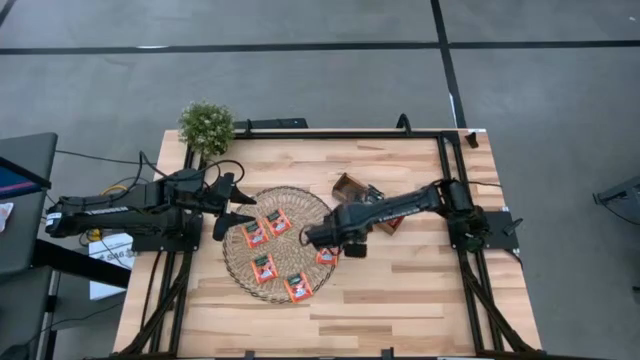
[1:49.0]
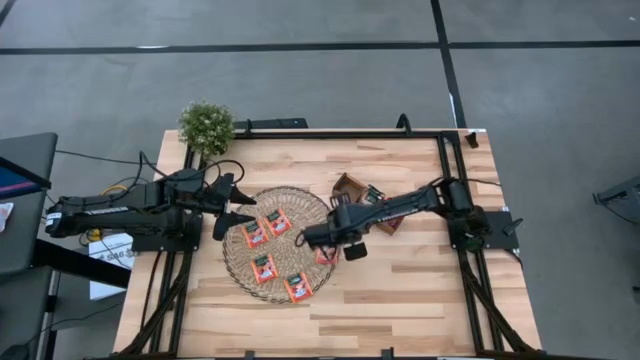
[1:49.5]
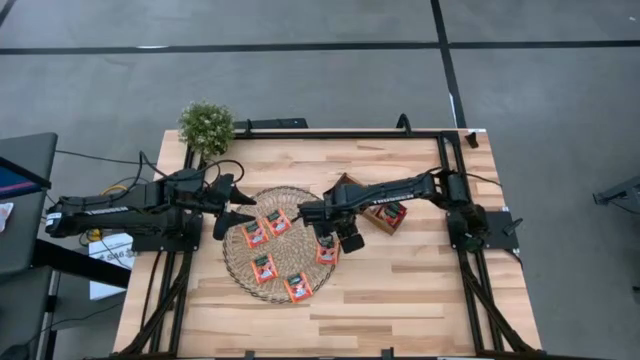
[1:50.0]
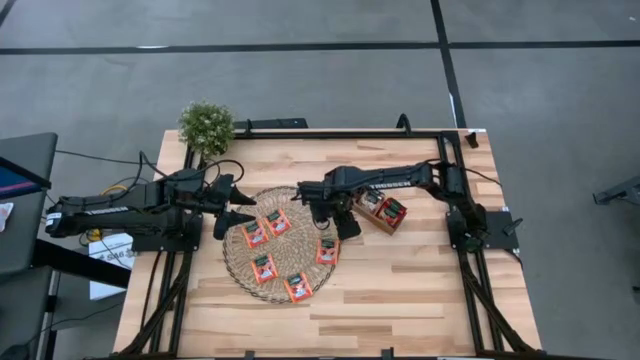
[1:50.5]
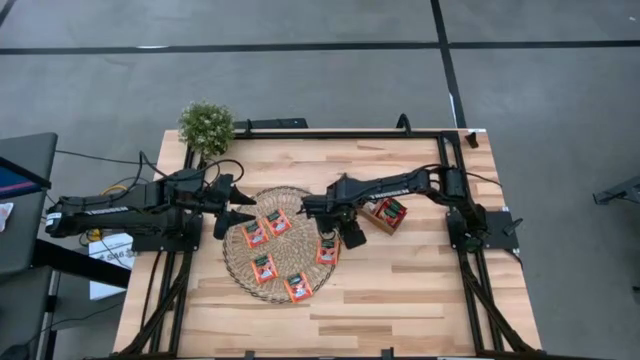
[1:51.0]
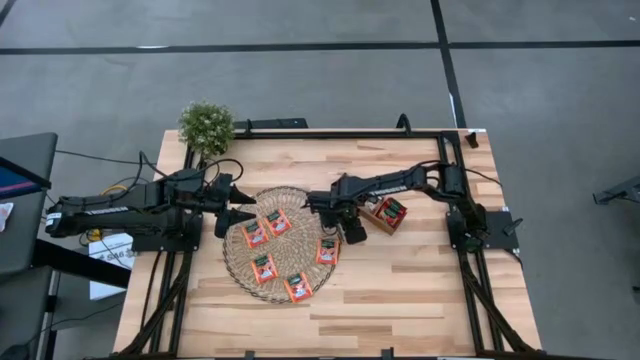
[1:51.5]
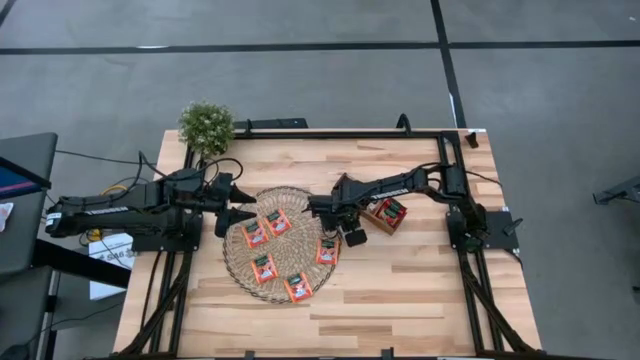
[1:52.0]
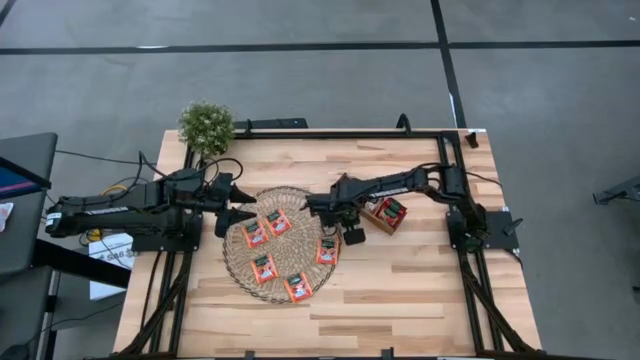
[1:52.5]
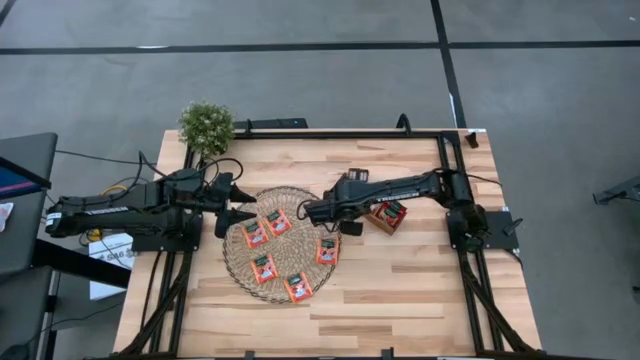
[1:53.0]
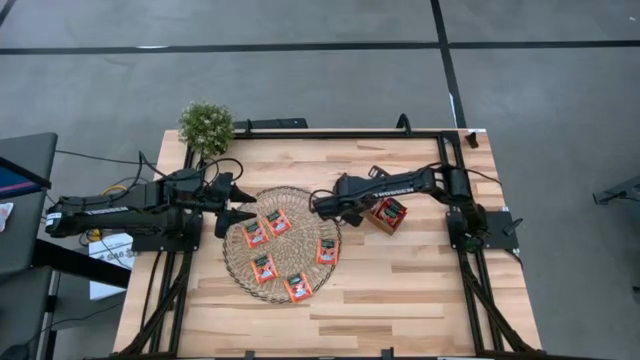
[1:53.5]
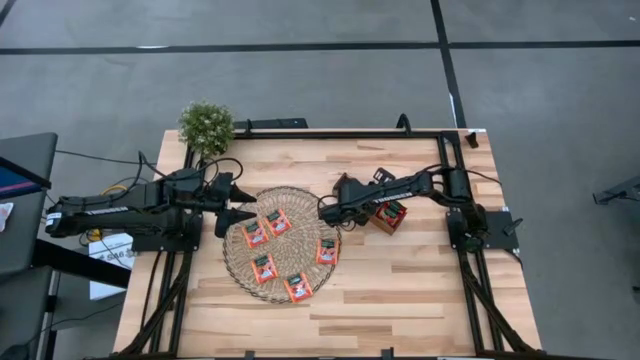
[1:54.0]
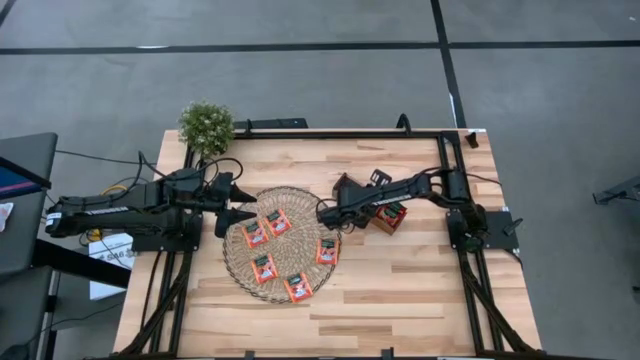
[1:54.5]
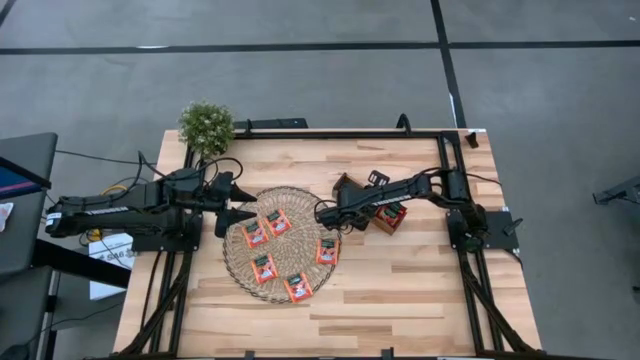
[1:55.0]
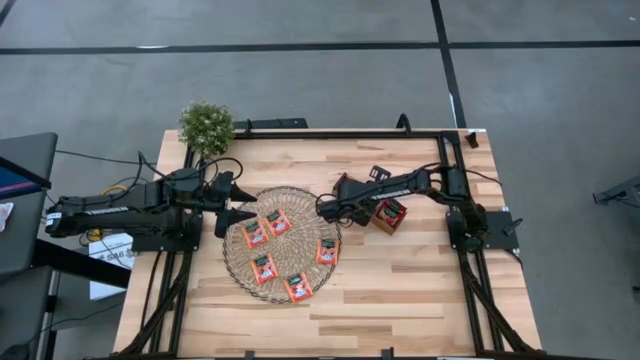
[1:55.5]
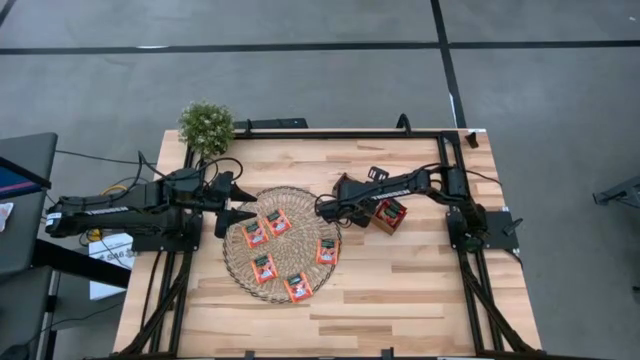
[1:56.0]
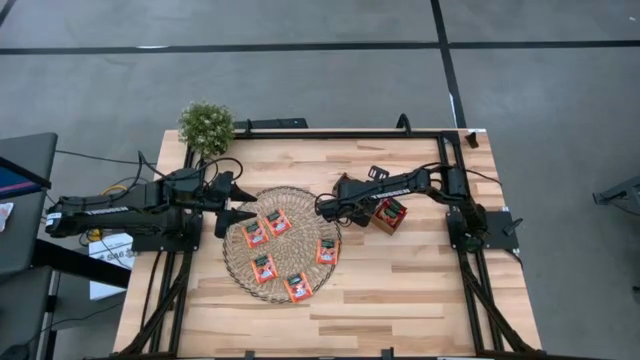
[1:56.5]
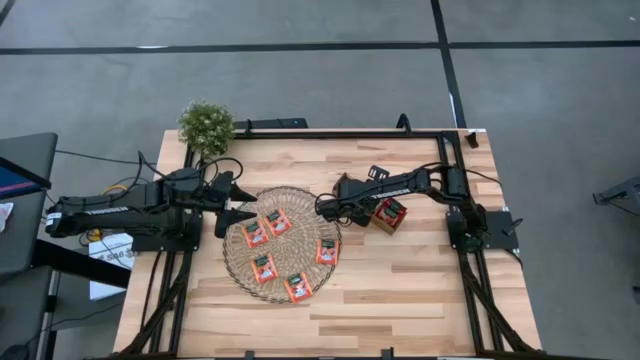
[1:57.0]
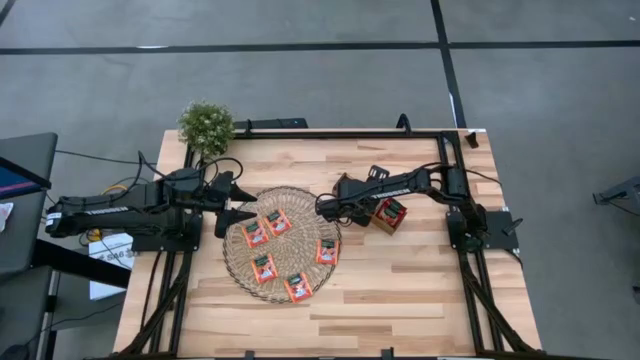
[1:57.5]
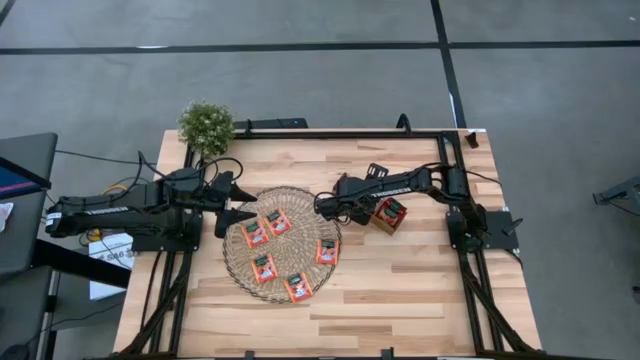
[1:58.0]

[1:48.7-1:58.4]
Task: Pick & Place Tea
Put the brown tea bag into the middle section of the wooden organizer

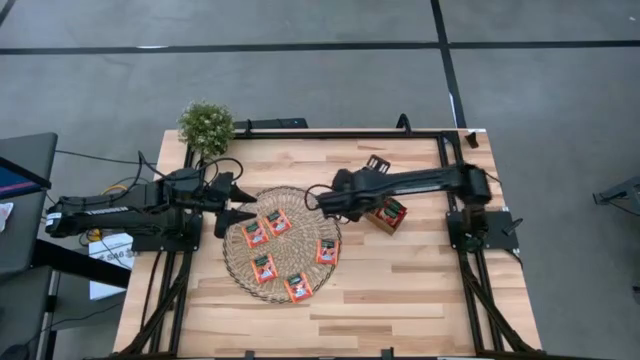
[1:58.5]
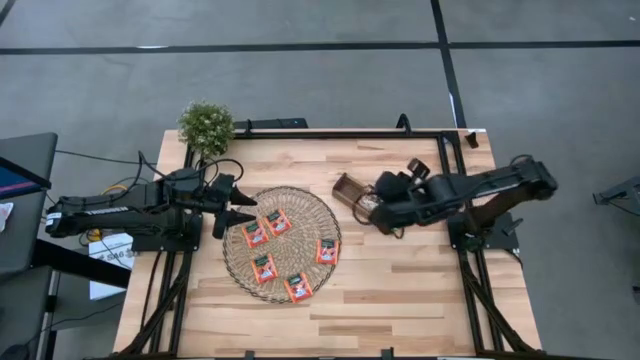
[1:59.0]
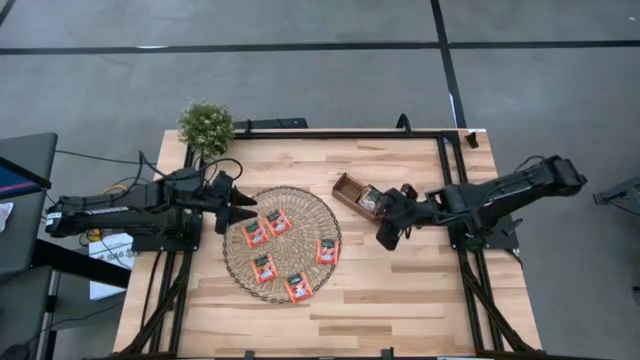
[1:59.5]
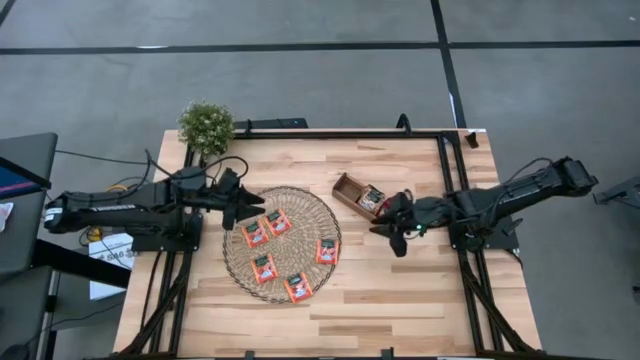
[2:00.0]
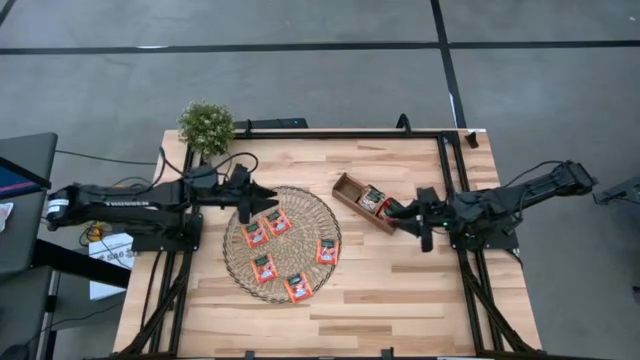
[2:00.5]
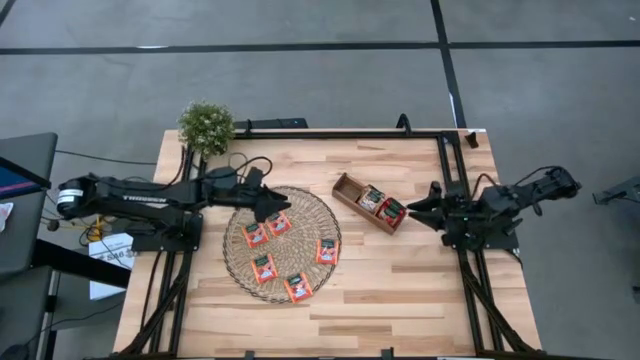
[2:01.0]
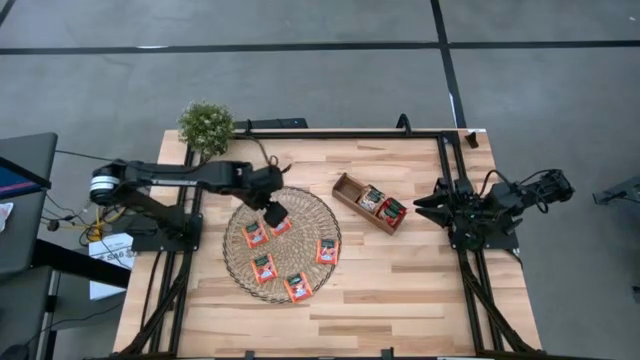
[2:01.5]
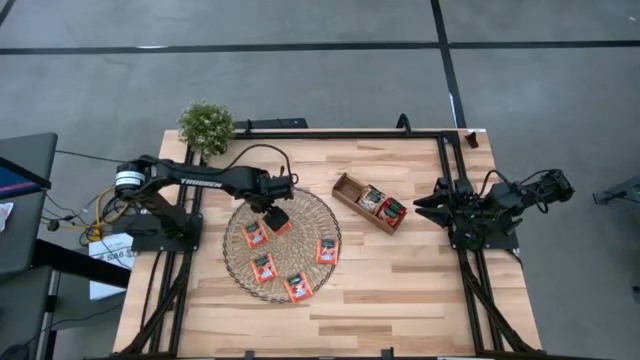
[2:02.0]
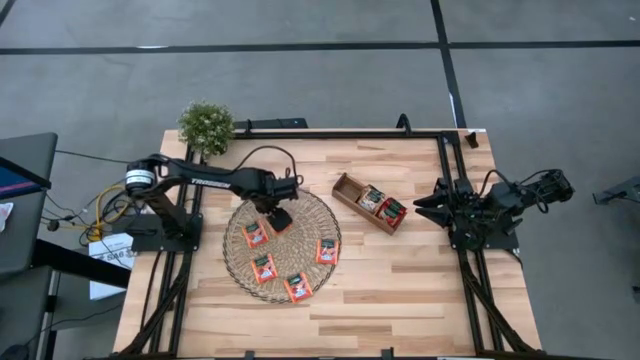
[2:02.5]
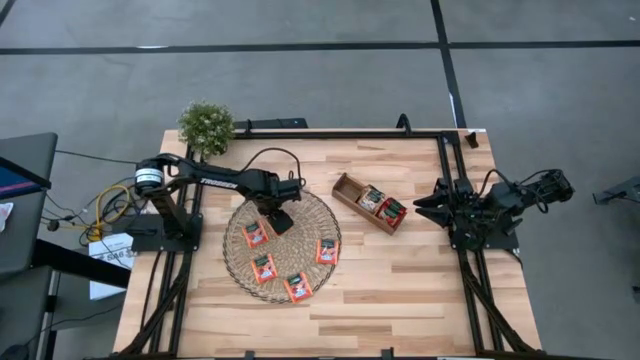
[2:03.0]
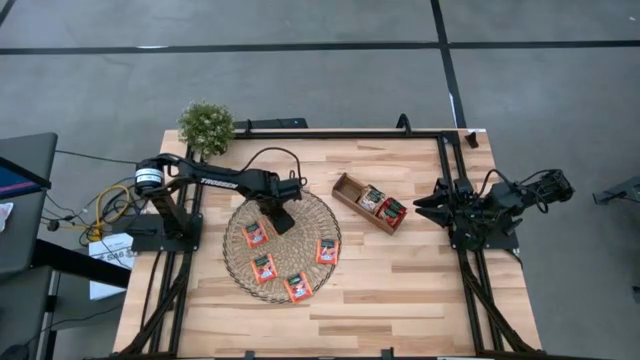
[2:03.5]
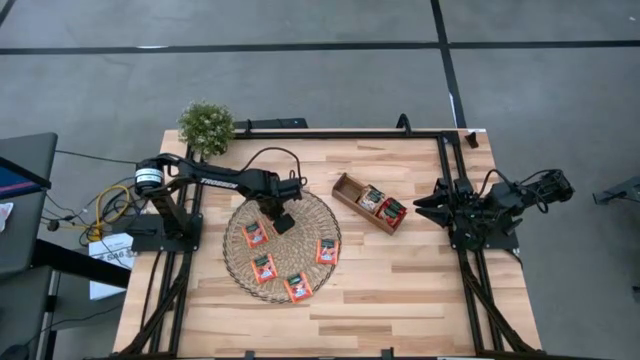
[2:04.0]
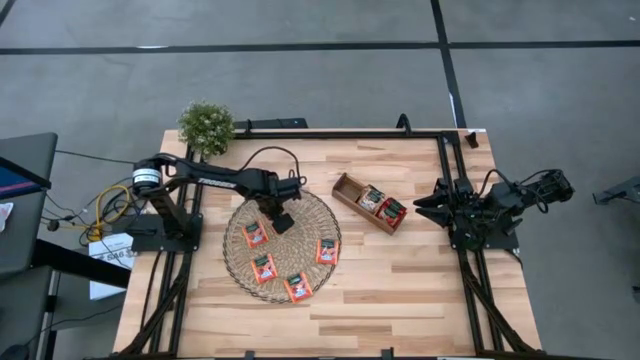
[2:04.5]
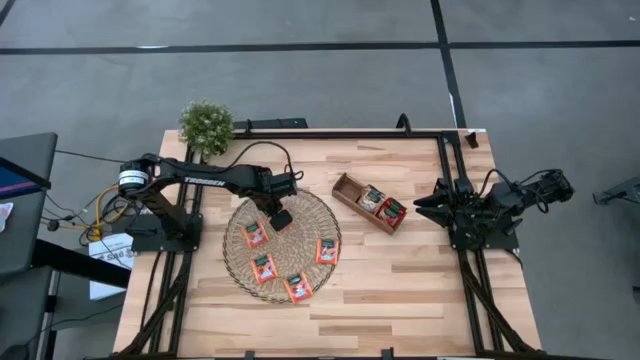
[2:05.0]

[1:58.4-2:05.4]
Put the orange tea bag into the left section of the wooden organizer

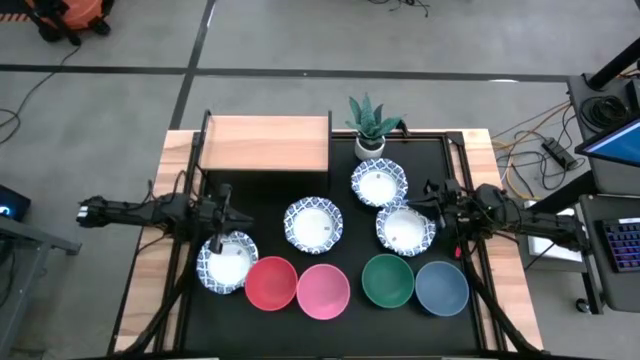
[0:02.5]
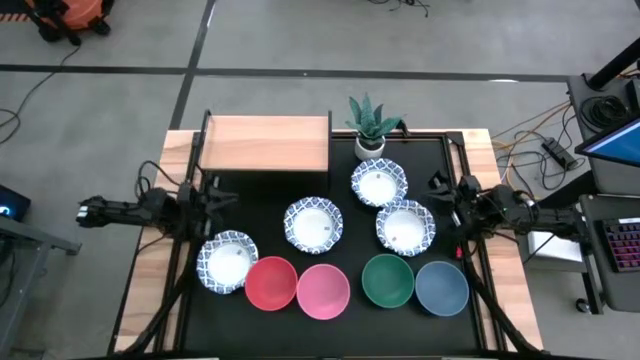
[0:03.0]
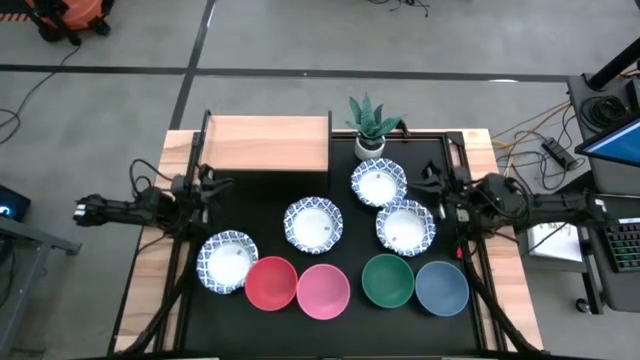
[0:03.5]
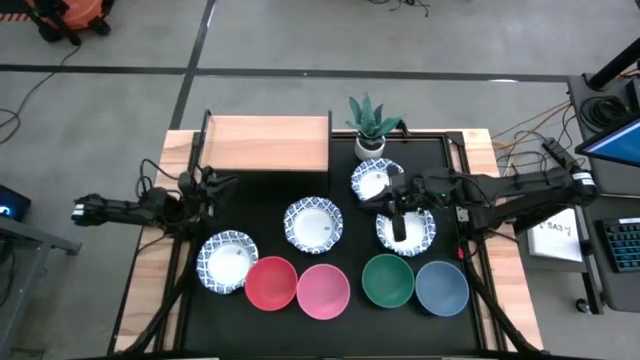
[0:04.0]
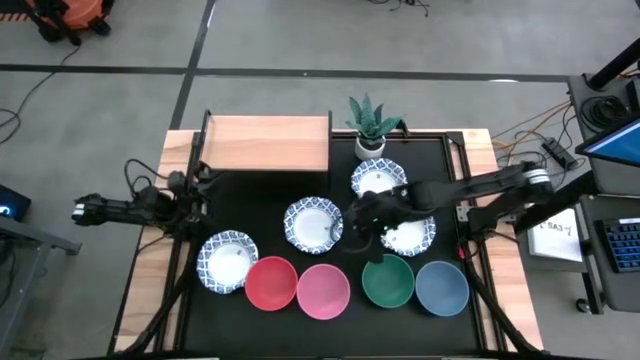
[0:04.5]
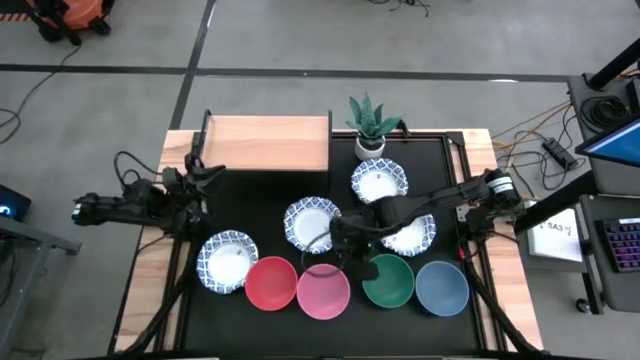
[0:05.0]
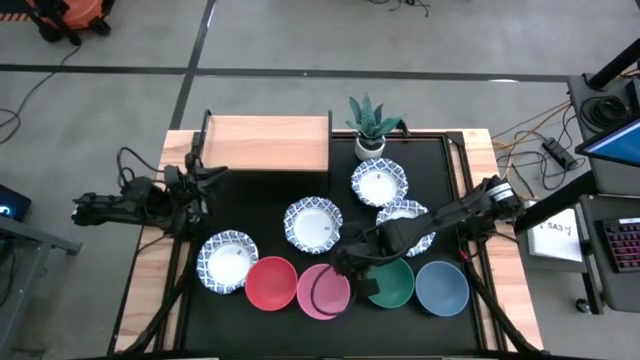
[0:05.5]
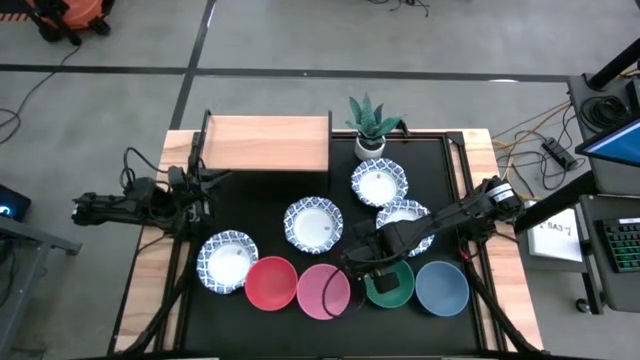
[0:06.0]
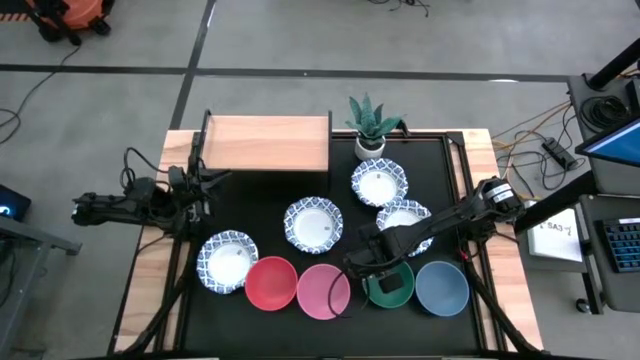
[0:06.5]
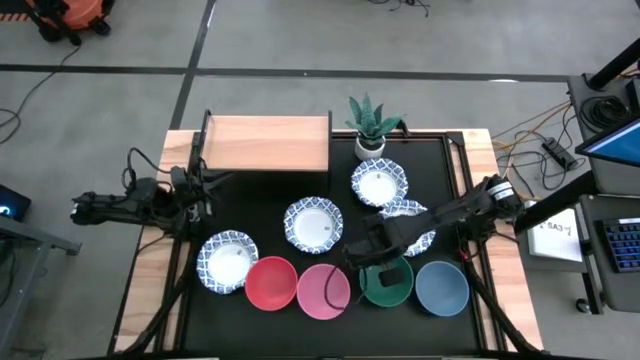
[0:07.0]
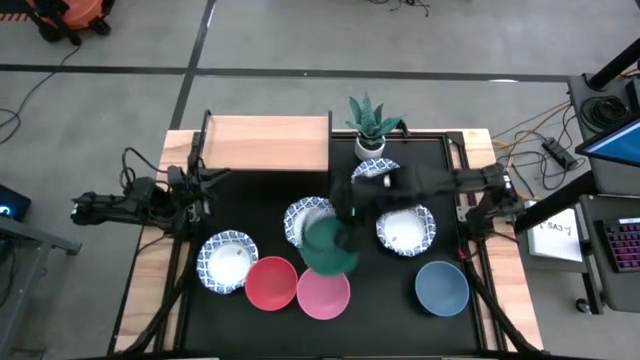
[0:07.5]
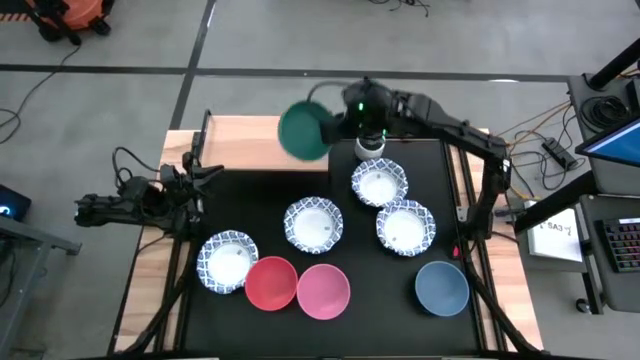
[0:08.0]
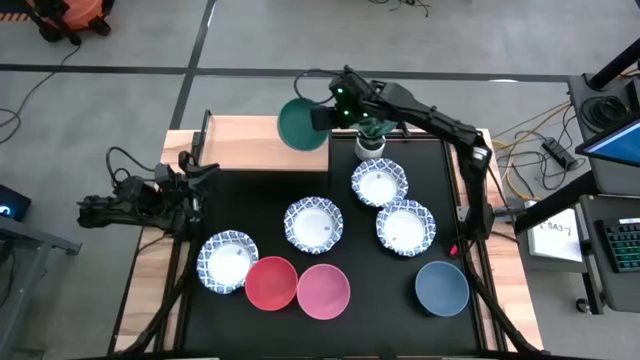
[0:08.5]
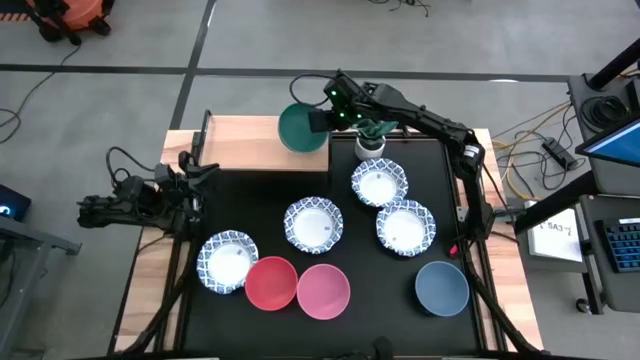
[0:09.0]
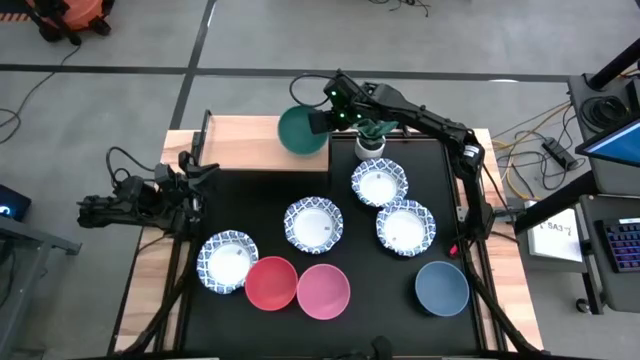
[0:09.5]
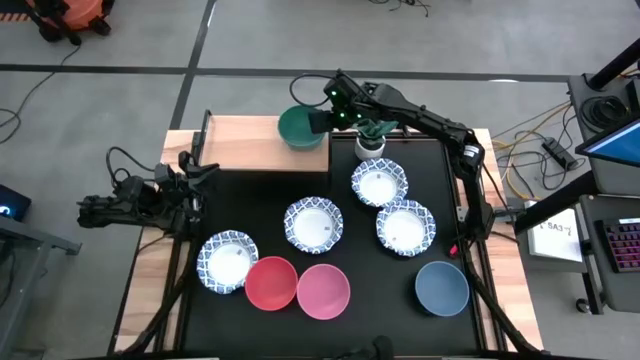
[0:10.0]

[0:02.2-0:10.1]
Task: Place and stack bowls onto a shelf
Put the green bowl on the shelf
